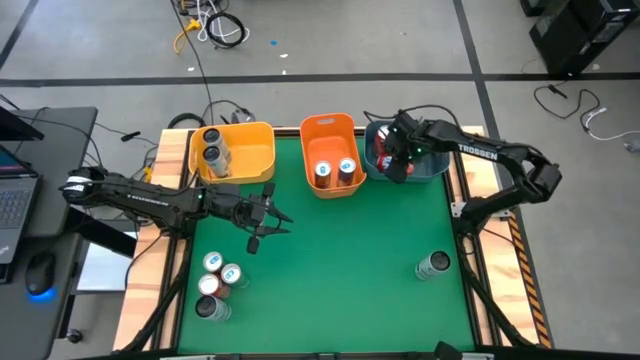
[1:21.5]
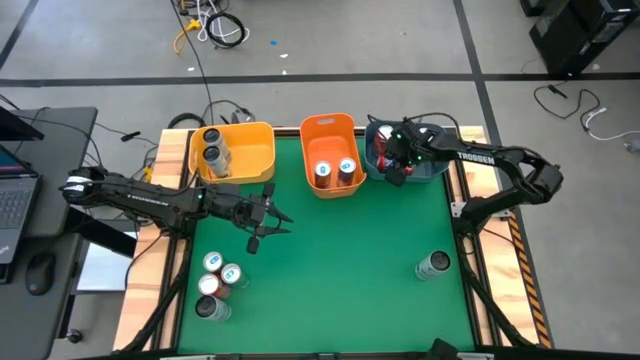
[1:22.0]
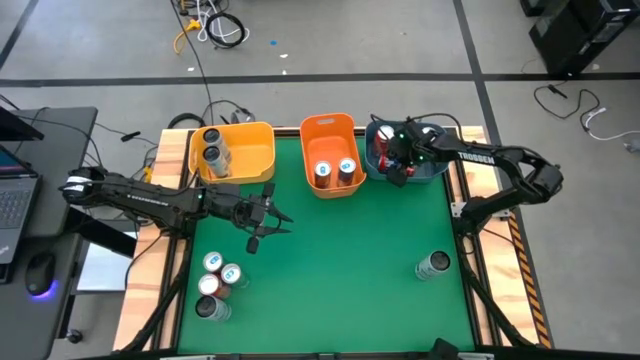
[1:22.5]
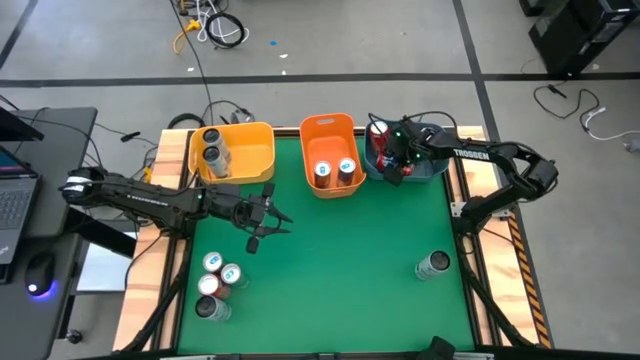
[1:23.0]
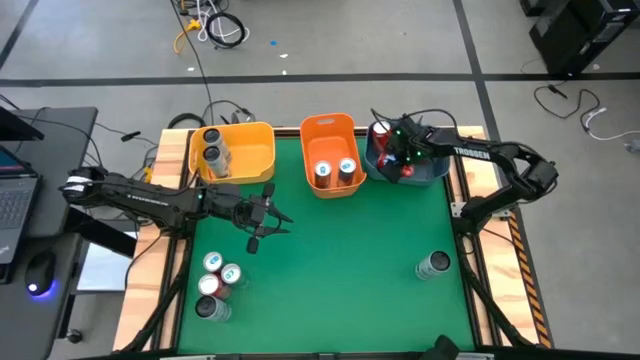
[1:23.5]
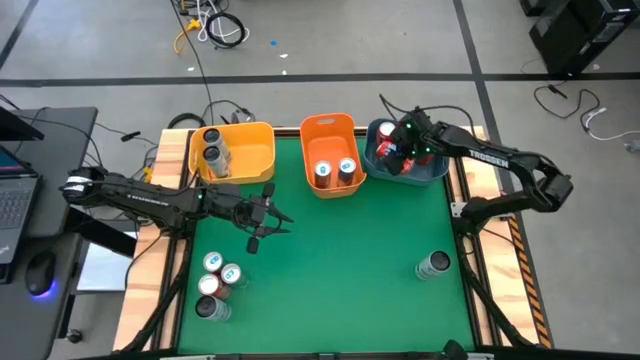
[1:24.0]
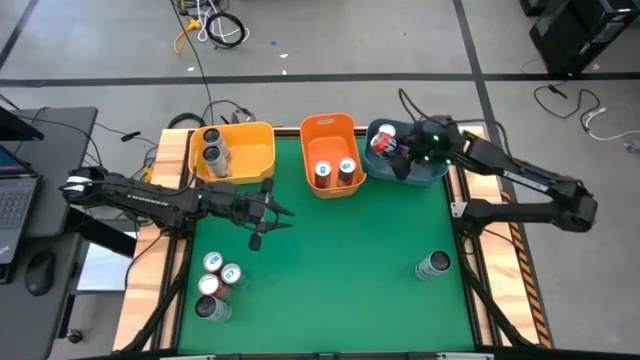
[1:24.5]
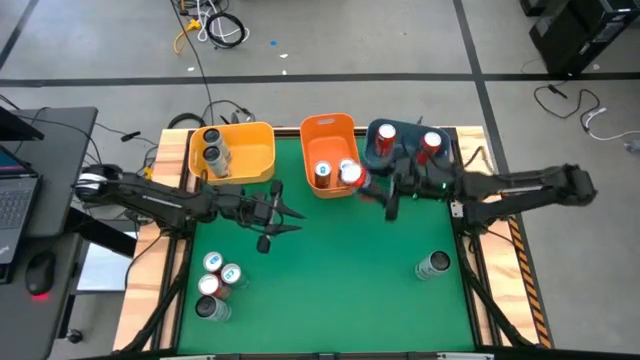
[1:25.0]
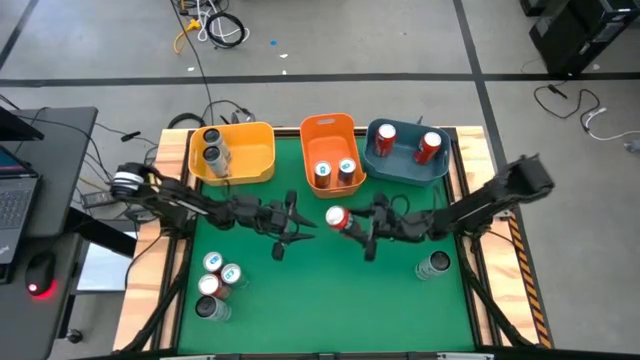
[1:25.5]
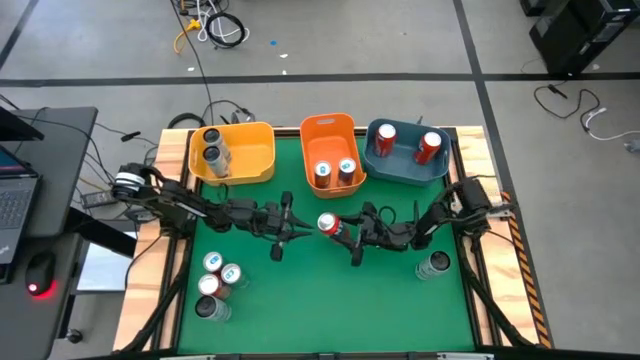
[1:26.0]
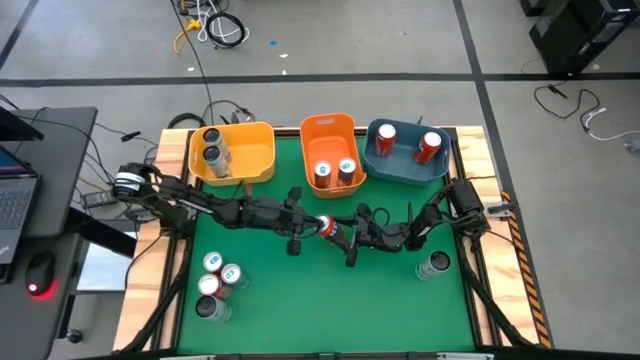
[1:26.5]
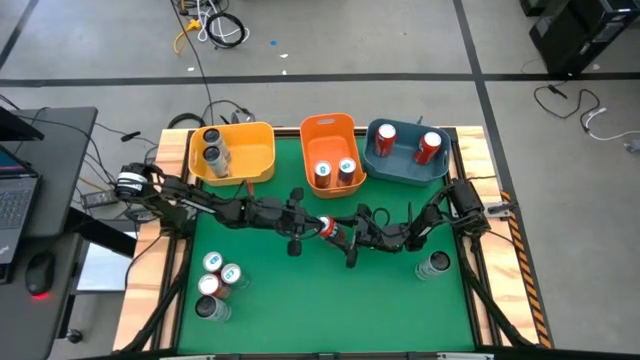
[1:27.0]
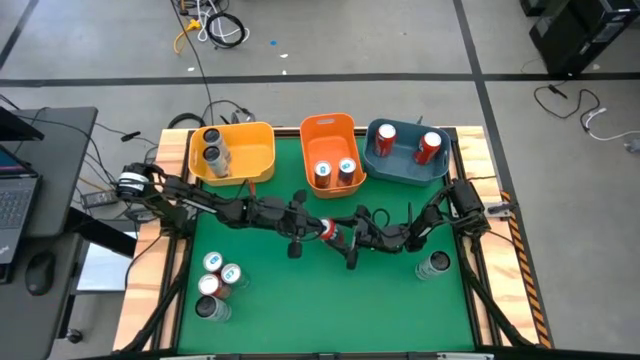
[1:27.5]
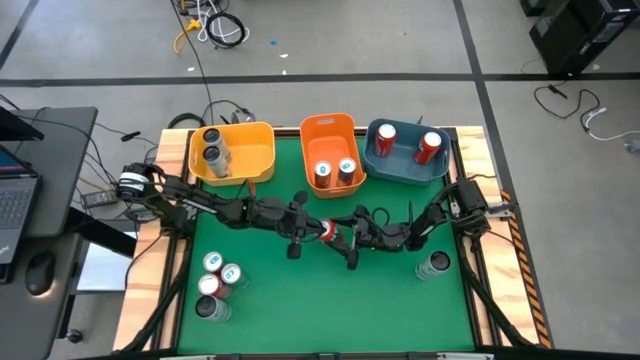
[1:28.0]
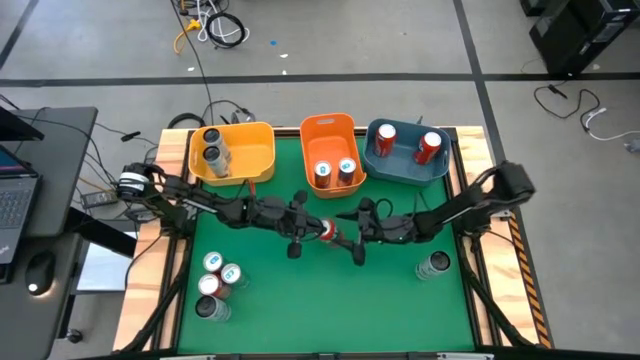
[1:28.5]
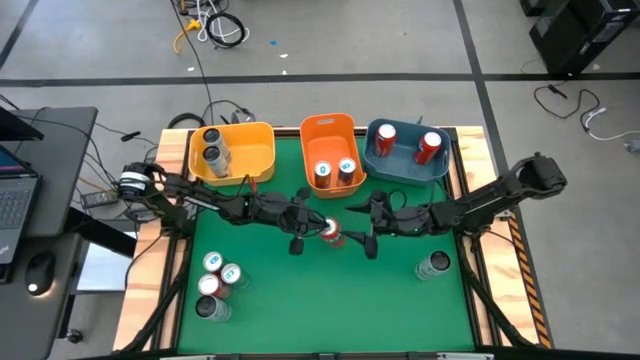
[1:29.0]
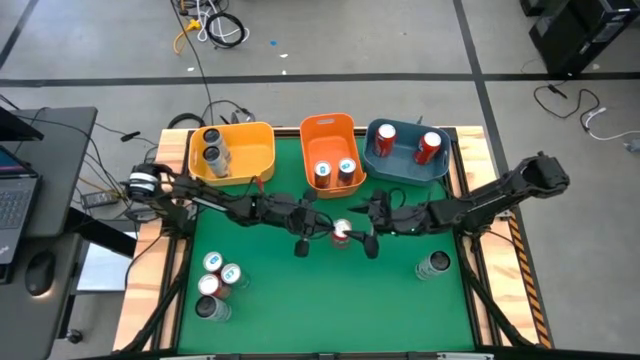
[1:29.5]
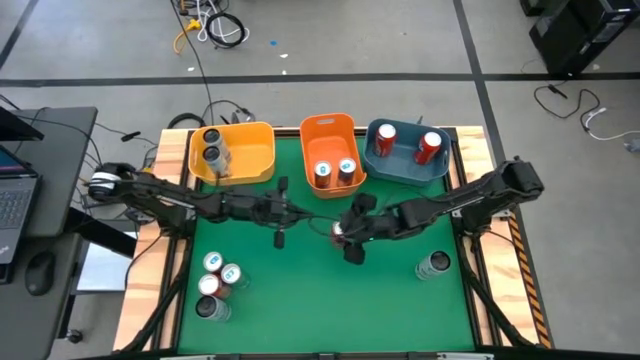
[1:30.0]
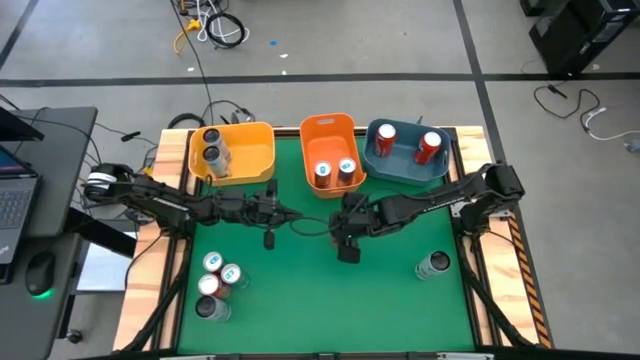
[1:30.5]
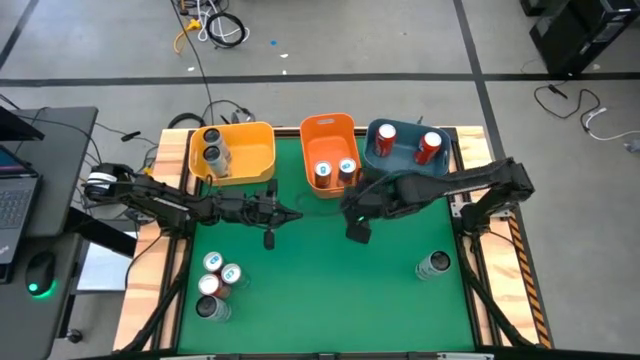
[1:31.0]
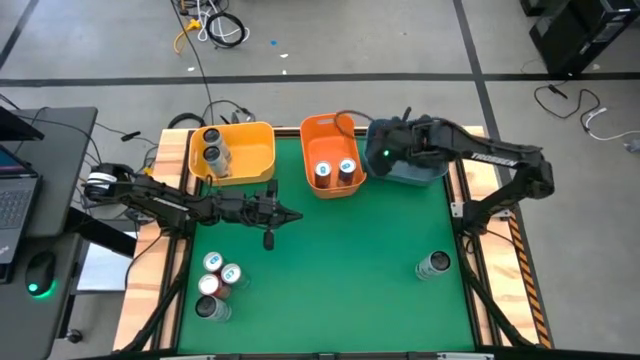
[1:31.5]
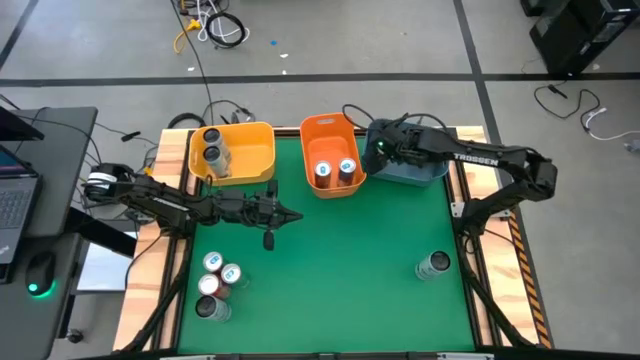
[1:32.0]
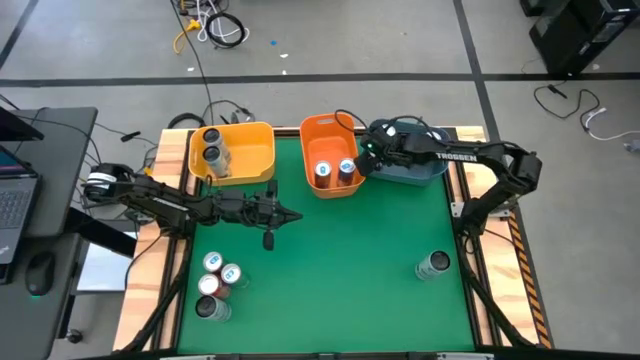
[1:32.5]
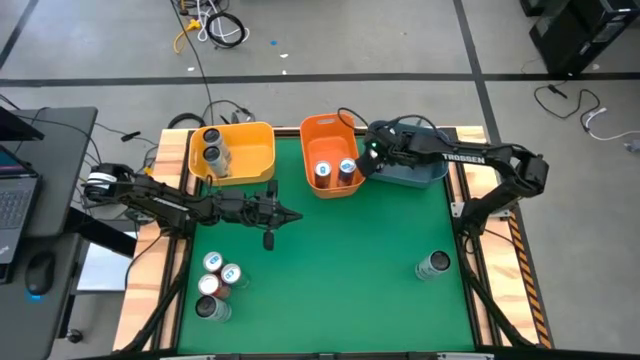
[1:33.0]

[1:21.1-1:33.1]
Task: Sort soda cans
Put the orange soda can into the blue bin

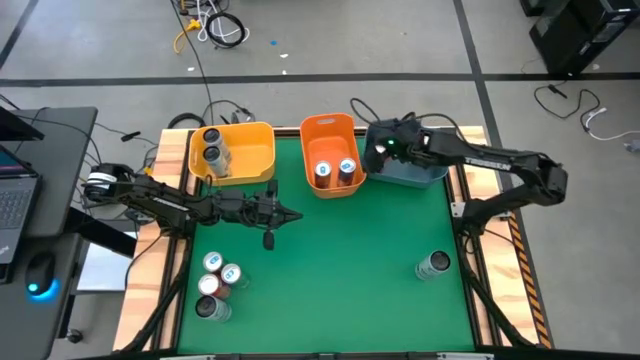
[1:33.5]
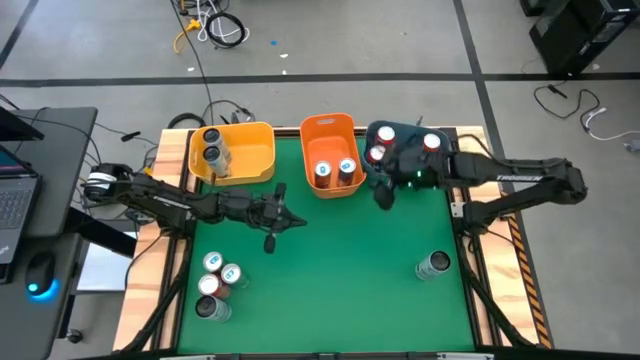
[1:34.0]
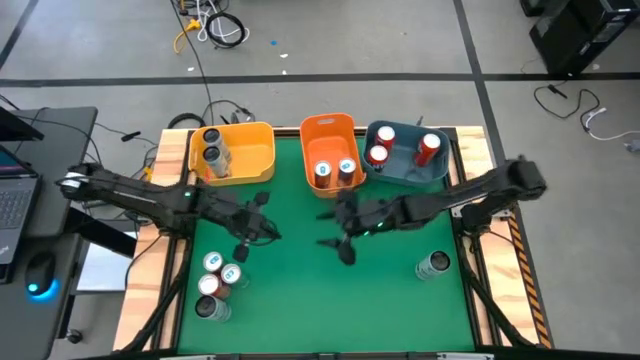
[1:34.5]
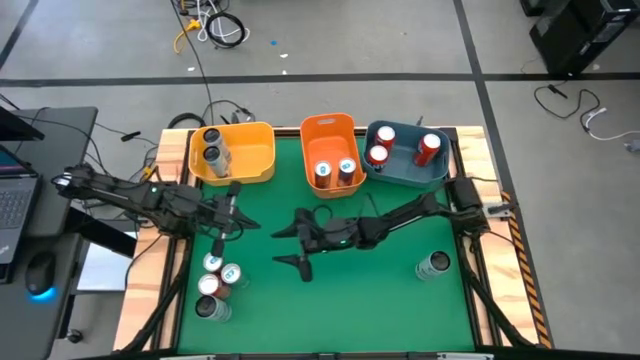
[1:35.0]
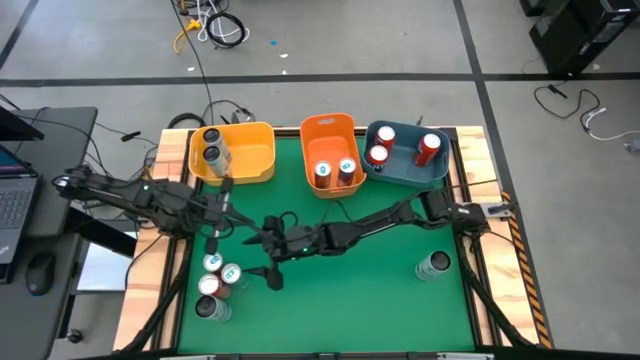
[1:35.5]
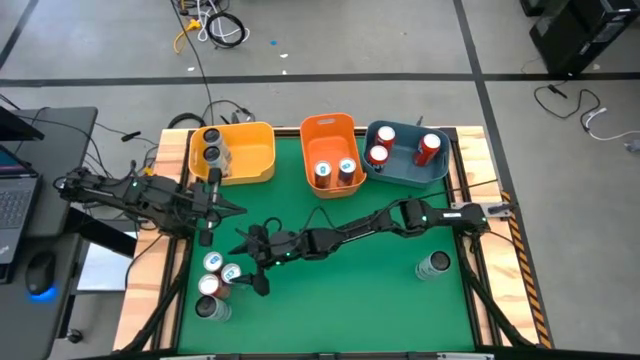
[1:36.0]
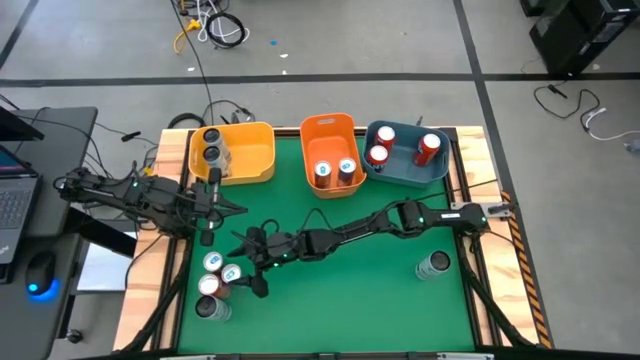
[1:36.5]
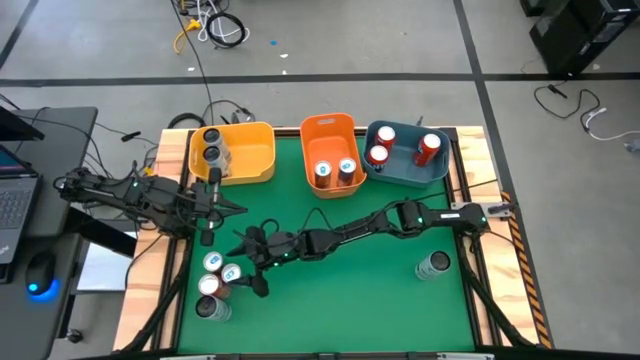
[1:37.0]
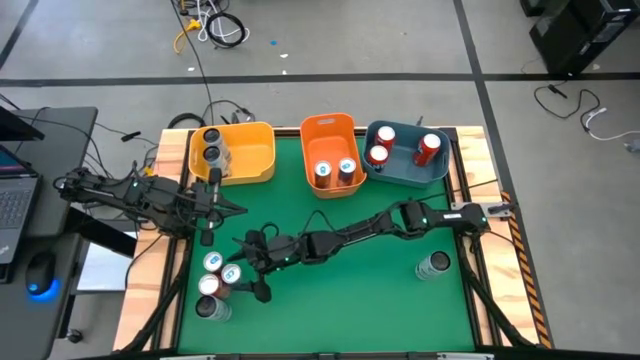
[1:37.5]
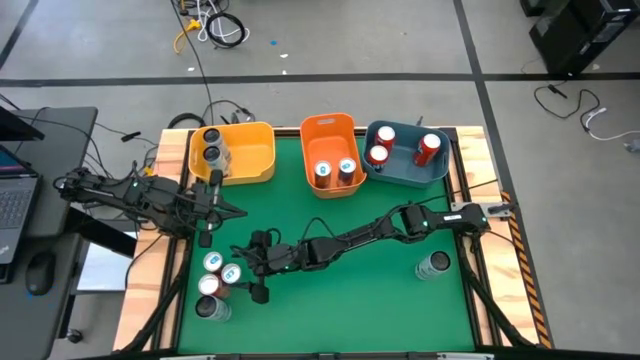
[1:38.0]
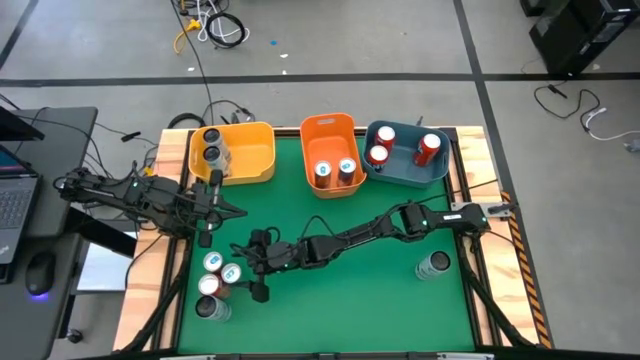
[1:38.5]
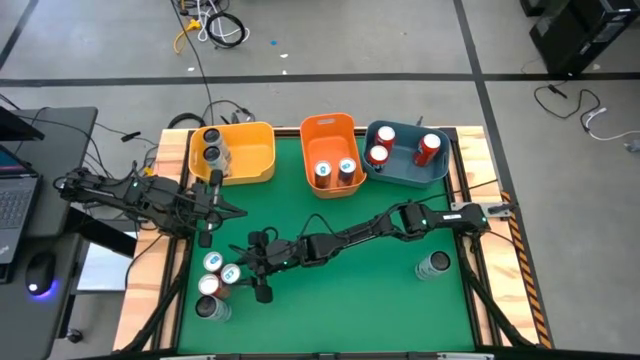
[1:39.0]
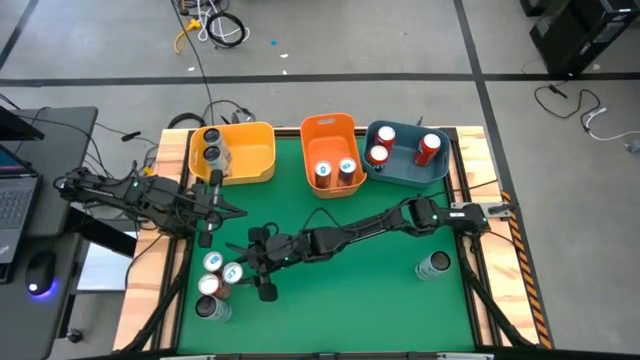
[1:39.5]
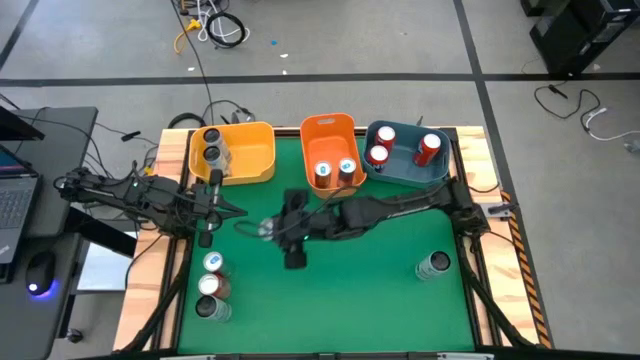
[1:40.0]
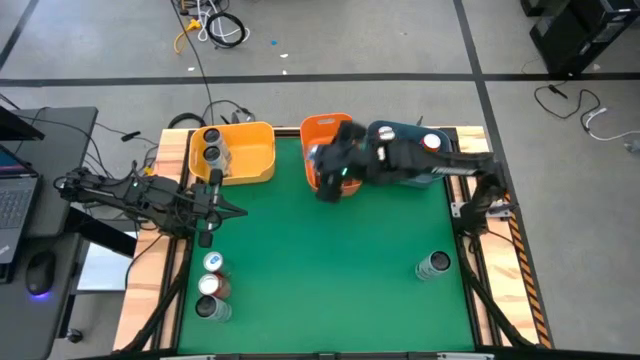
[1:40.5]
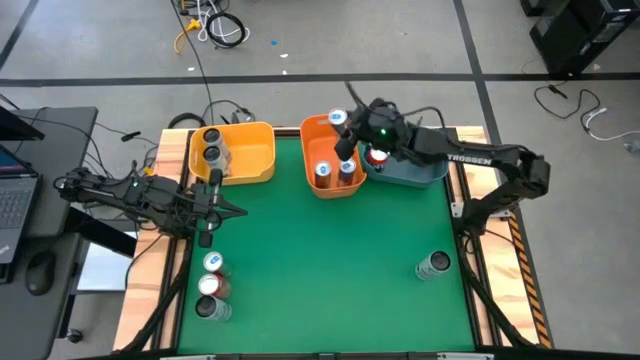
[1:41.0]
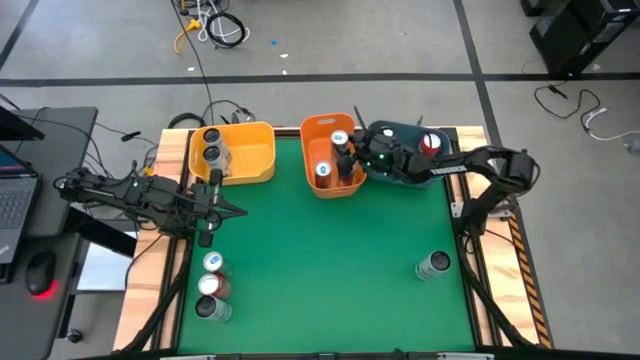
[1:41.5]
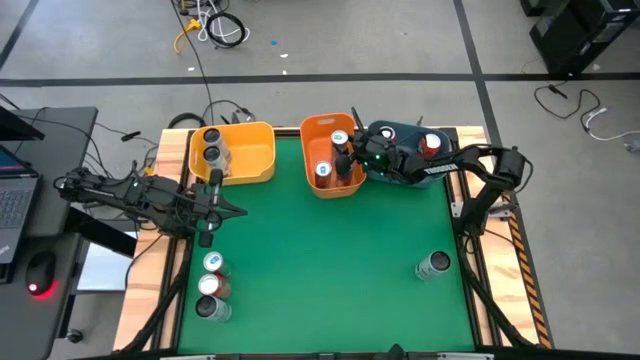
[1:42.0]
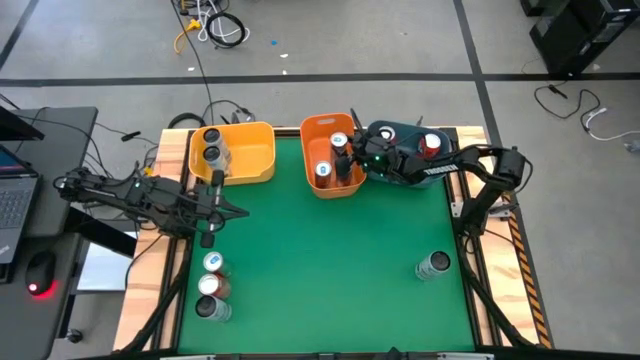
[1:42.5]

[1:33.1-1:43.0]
Put the blue soda can into the orange bin
